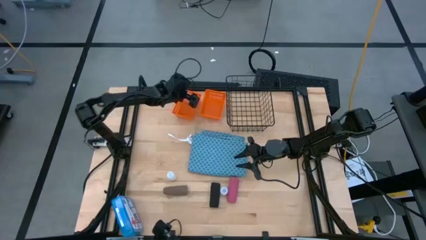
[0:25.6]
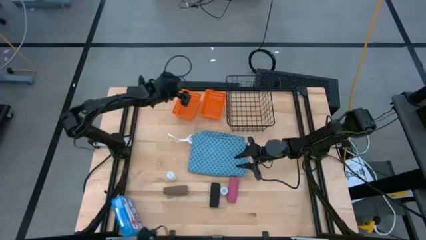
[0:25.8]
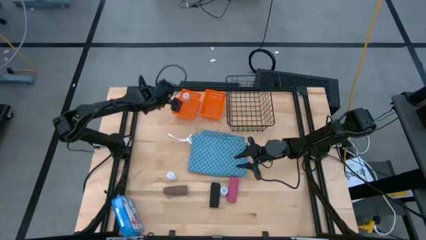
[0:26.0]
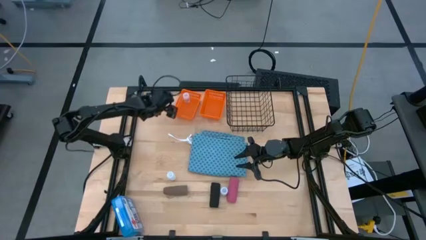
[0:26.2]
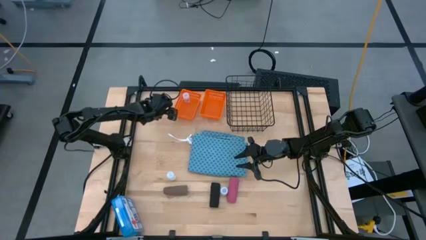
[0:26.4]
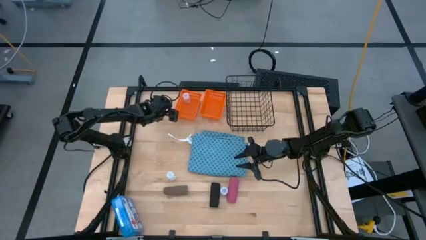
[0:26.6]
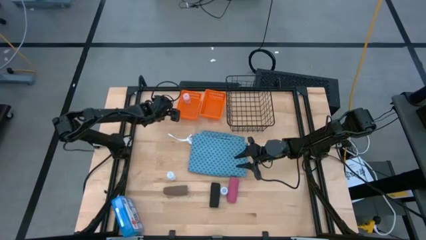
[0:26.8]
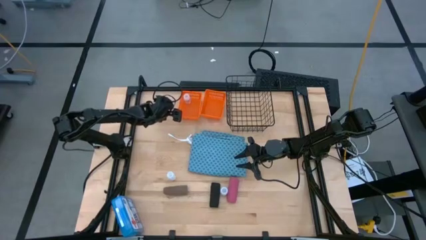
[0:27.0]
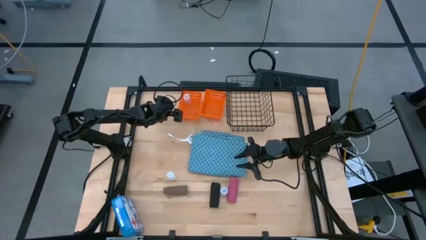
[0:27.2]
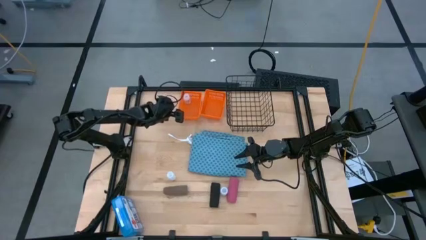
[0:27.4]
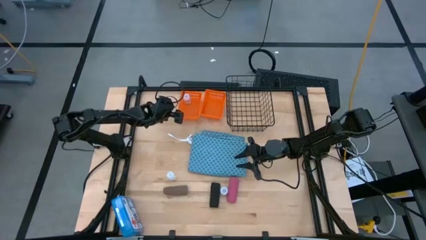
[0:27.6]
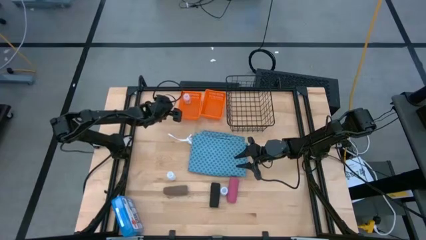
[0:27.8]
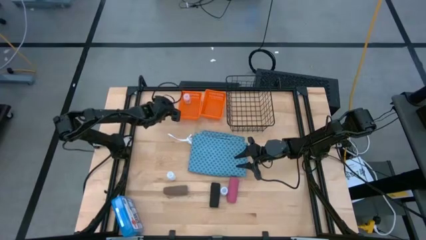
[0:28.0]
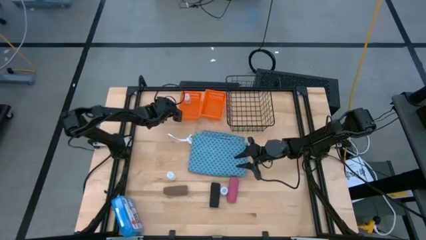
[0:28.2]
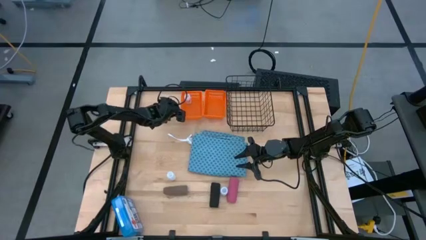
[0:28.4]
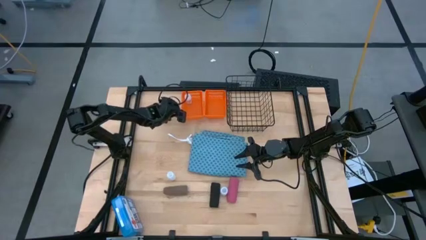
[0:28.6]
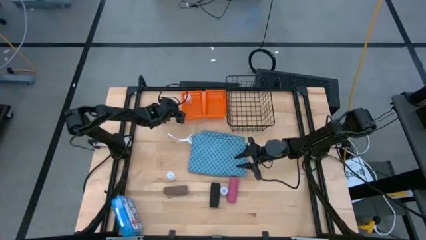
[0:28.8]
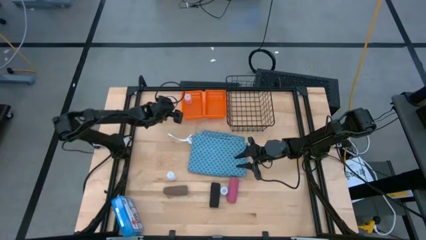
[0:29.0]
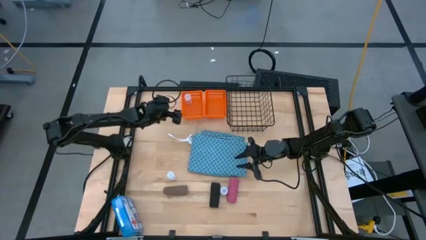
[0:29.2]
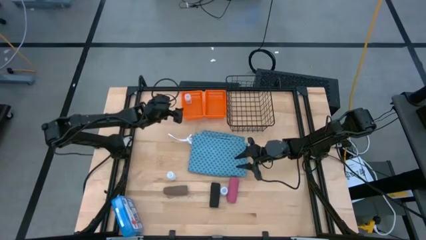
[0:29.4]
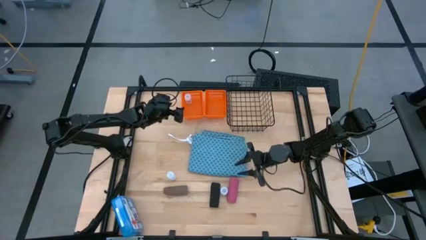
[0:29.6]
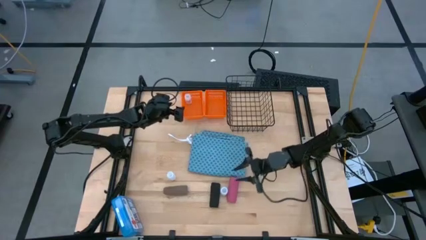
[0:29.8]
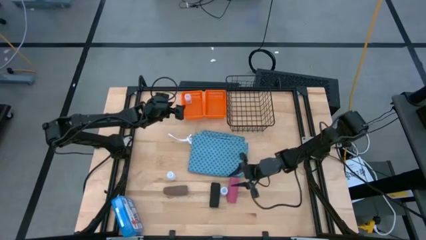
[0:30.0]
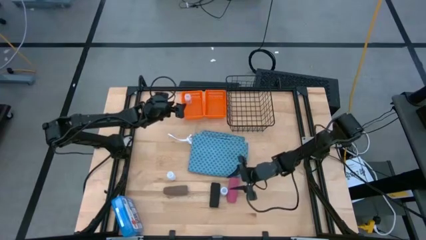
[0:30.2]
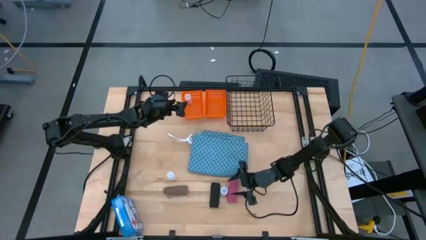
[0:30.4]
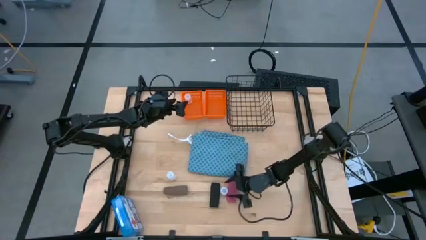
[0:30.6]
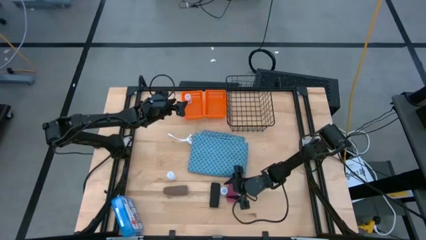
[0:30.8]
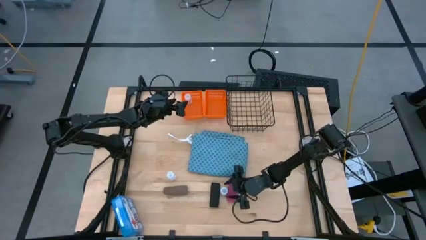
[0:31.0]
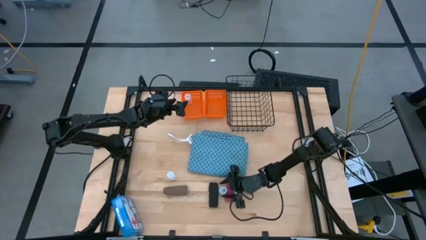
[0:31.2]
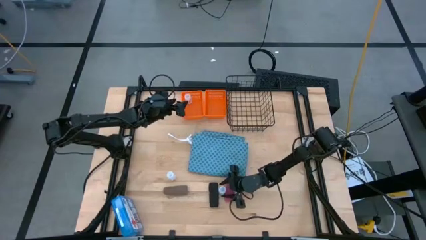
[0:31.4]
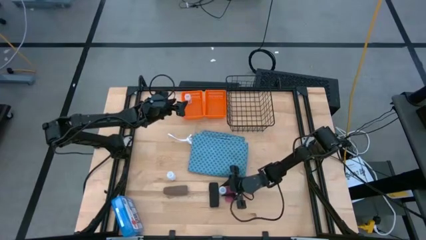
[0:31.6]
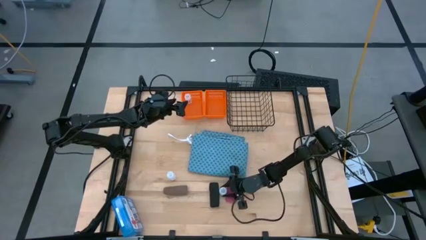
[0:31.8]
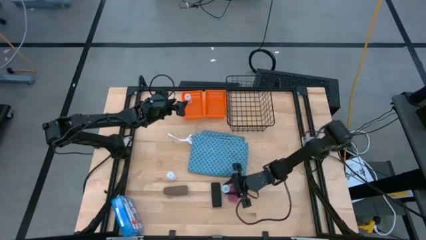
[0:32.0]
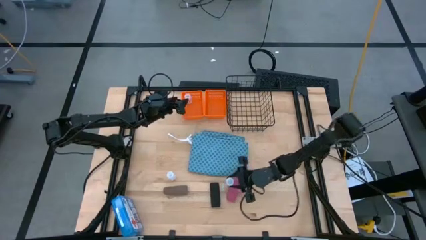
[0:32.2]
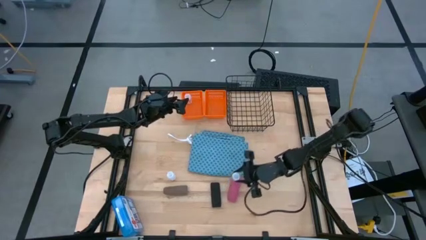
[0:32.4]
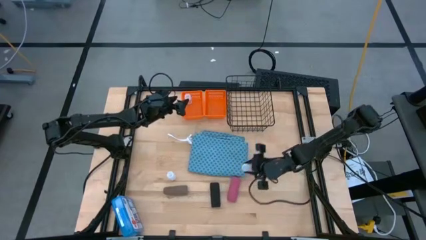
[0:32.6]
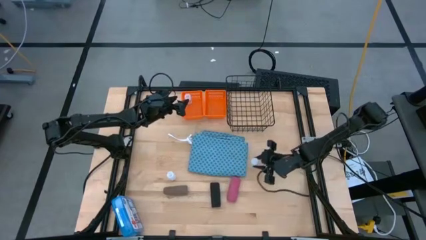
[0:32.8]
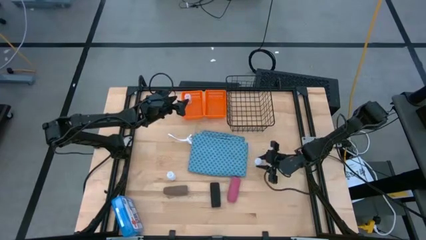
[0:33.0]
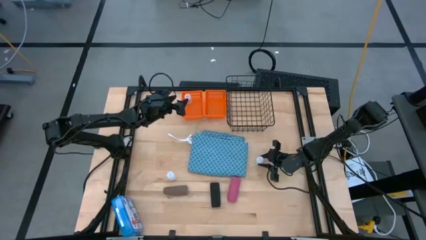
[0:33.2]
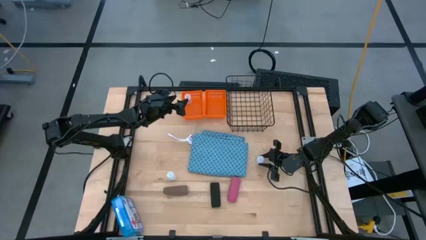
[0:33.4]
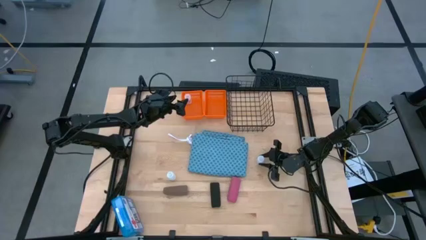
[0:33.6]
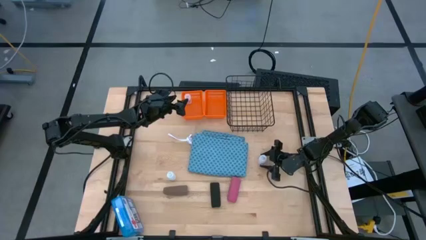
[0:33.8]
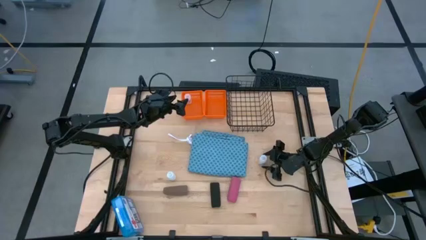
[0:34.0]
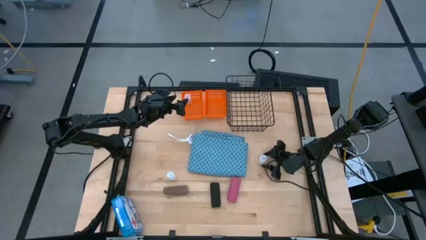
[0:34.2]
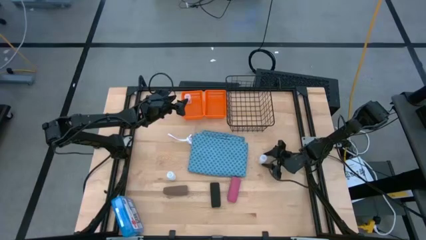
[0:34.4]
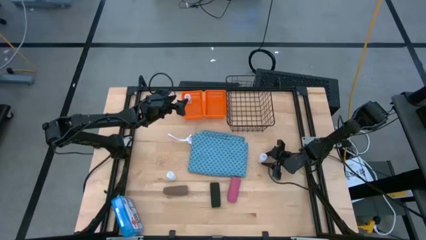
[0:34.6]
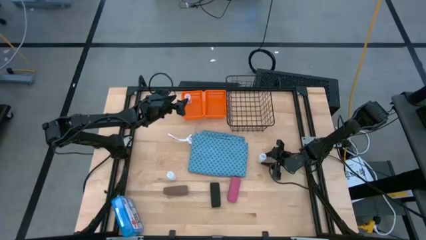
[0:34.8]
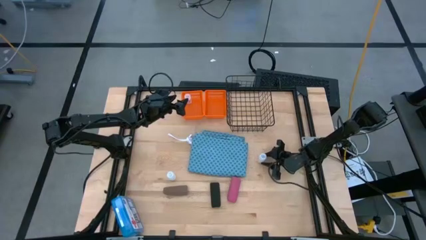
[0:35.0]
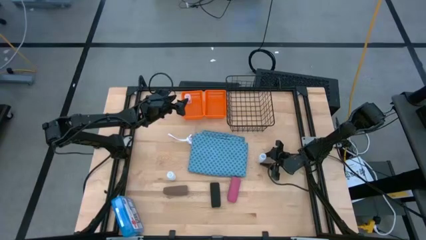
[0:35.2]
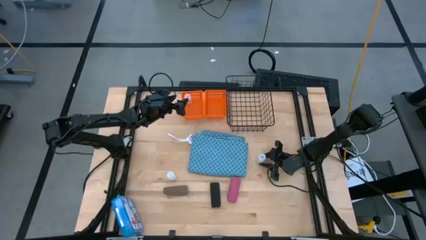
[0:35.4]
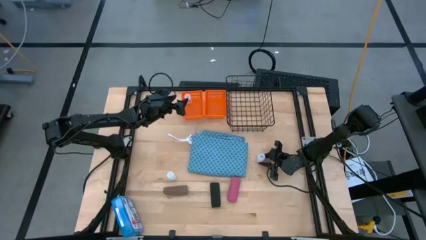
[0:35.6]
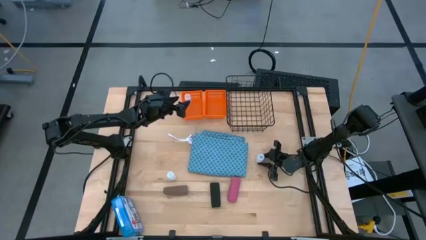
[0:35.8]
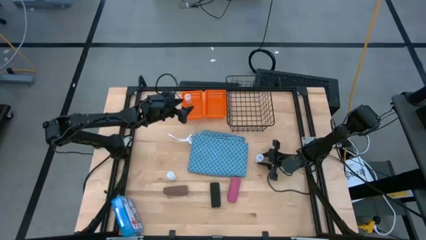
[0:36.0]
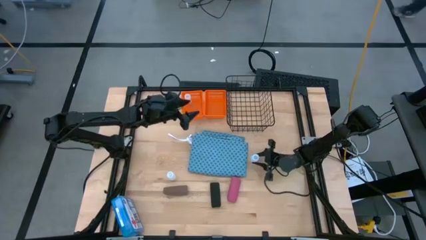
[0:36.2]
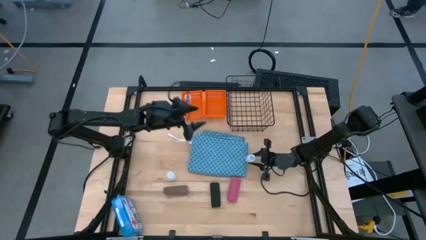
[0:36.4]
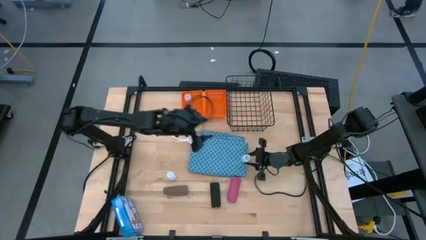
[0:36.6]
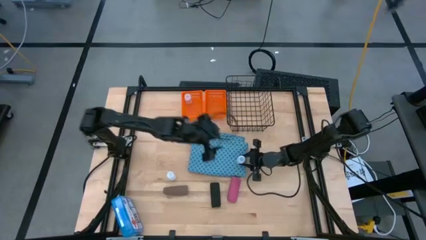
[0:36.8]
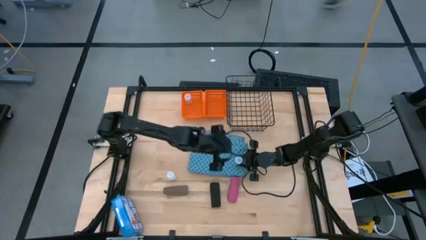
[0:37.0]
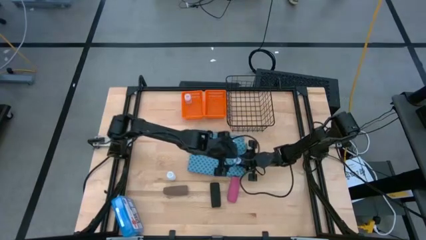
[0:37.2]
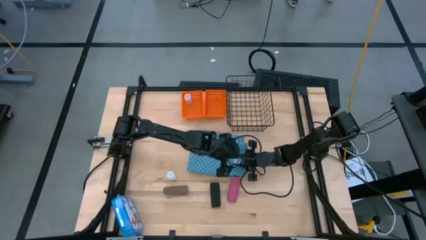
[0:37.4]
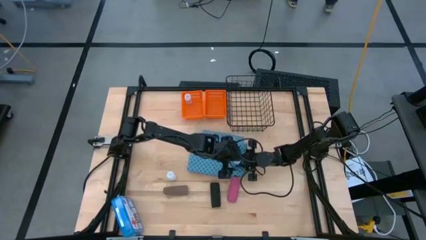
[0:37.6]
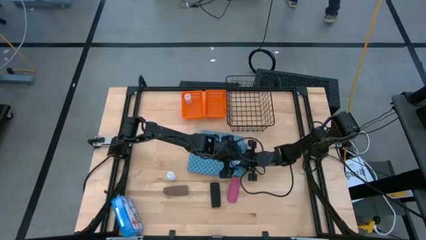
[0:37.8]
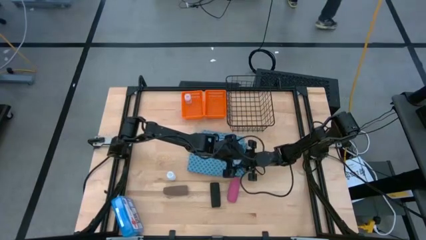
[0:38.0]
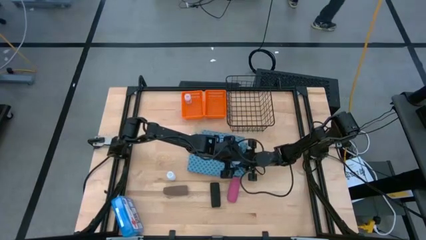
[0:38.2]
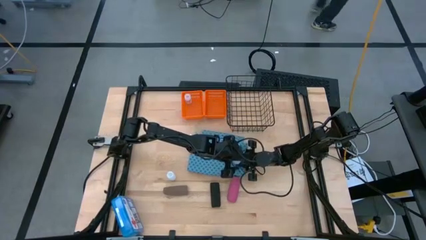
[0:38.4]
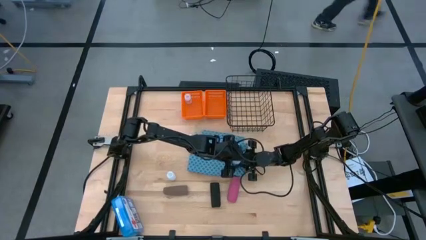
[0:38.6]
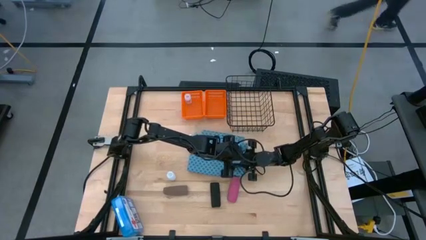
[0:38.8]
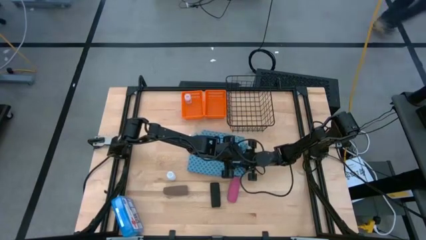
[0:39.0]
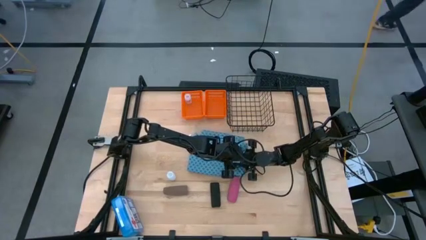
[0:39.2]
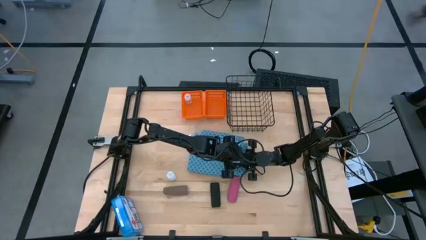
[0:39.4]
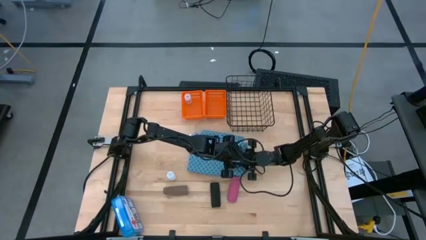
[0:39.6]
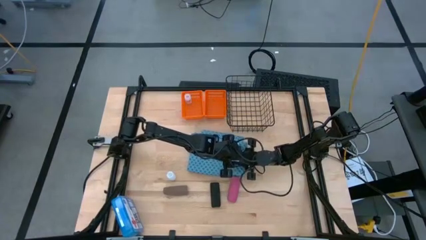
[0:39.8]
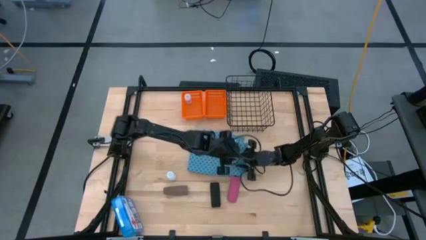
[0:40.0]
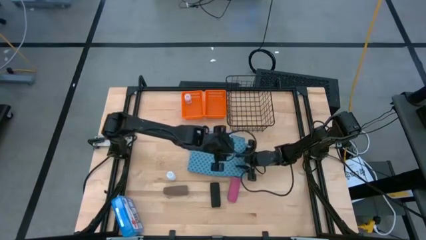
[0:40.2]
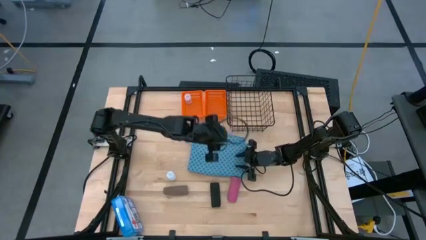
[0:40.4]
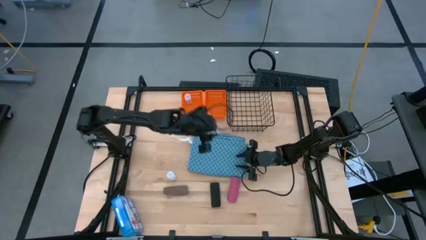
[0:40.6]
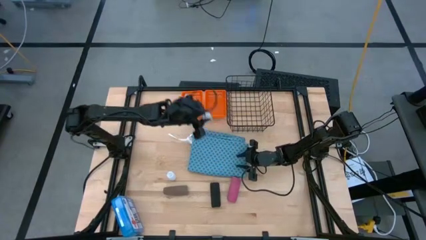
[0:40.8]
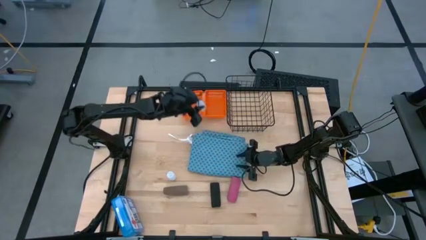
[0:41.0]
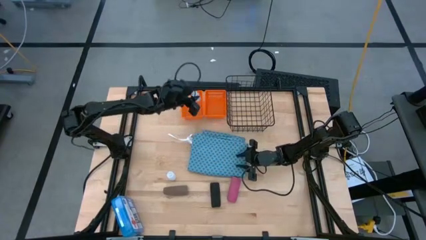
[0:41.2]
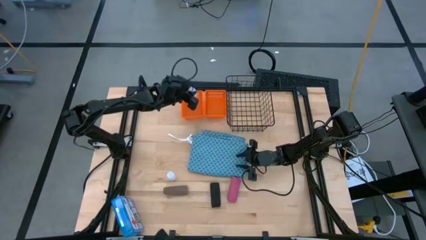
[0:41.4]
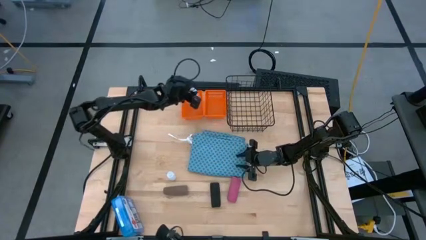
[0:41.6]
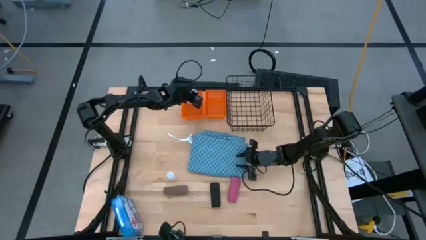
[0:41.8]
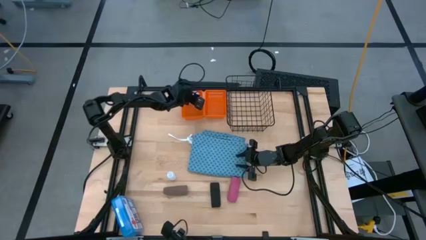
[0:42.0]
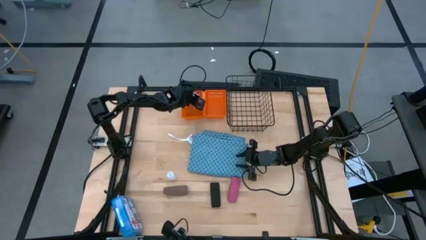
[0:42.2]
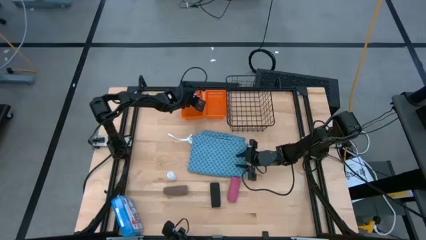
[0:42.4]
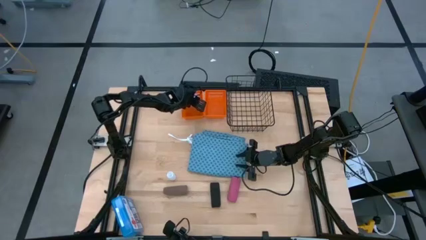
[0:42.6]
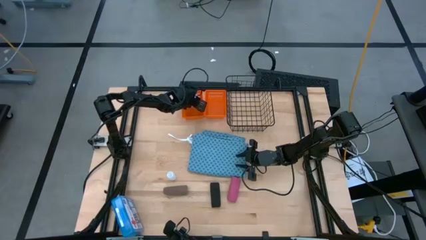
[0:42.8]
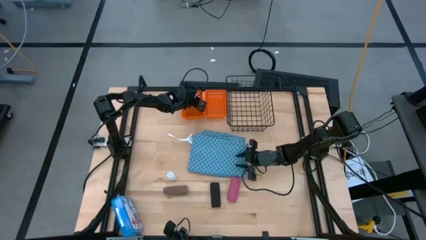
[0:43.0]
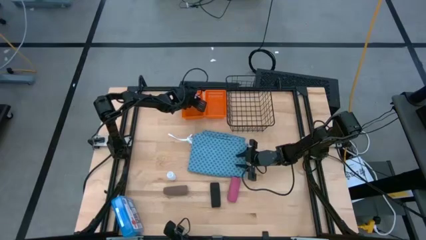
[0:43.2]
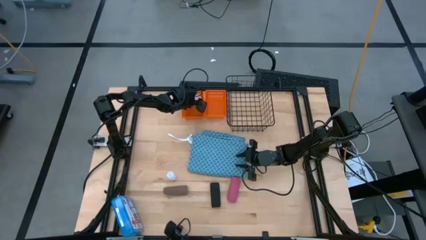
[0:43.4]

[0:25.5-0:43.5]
Task: Pick & Place Medicine items
Put the right transparent pill bottle into the left orange basket
